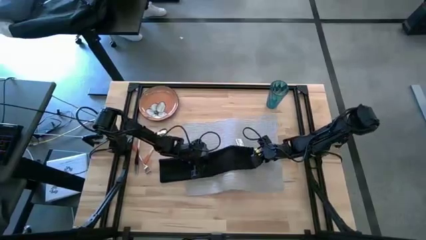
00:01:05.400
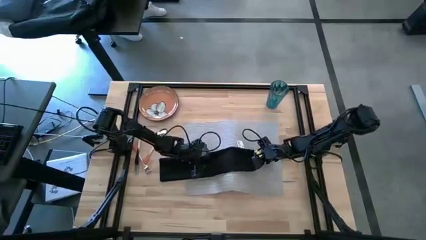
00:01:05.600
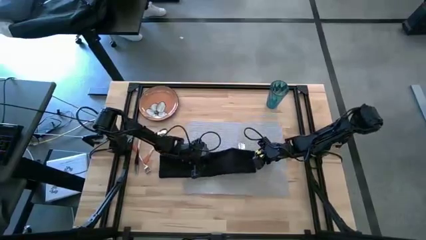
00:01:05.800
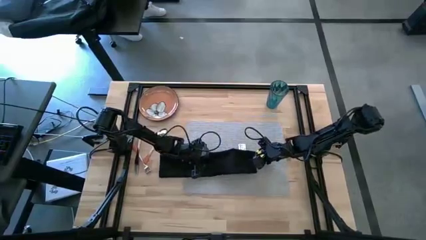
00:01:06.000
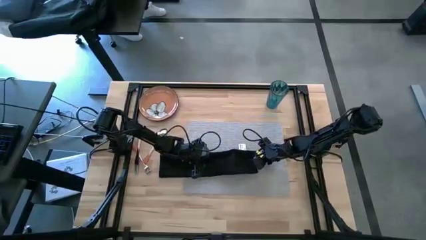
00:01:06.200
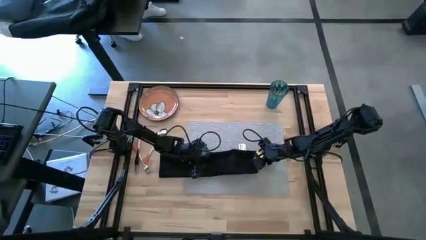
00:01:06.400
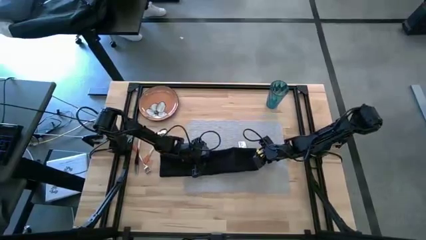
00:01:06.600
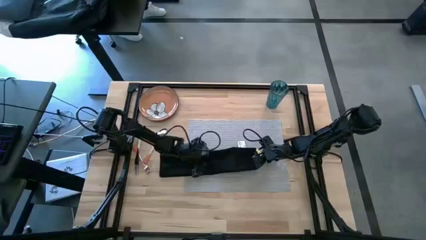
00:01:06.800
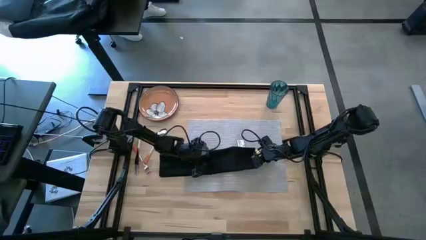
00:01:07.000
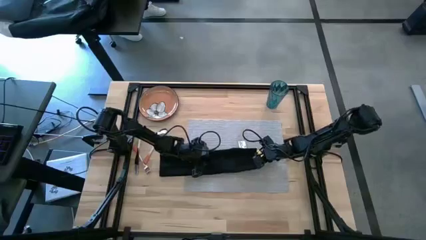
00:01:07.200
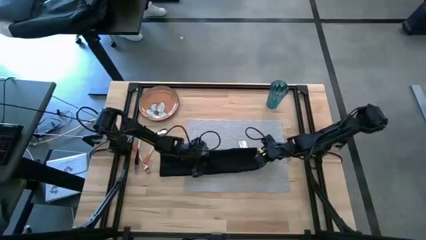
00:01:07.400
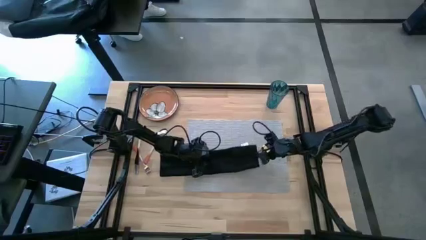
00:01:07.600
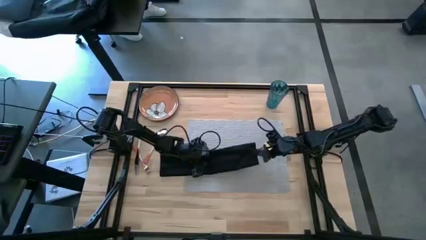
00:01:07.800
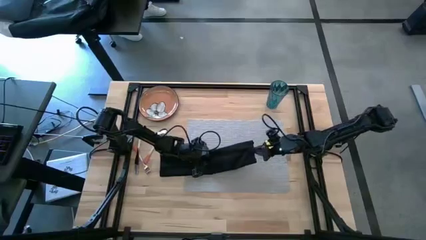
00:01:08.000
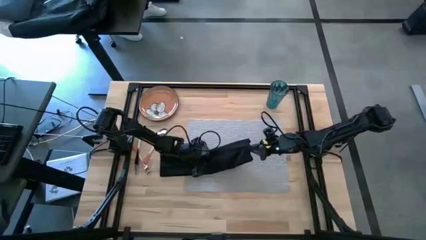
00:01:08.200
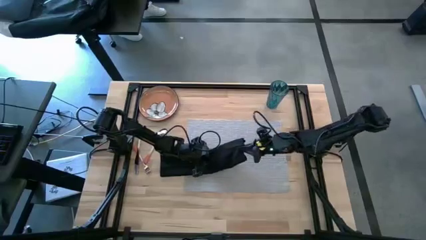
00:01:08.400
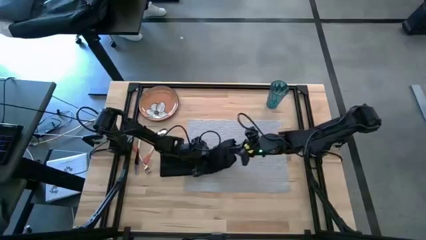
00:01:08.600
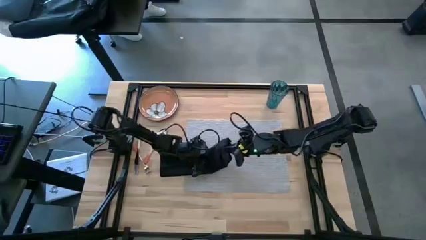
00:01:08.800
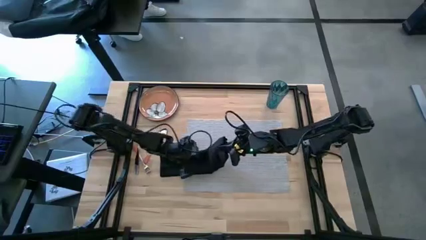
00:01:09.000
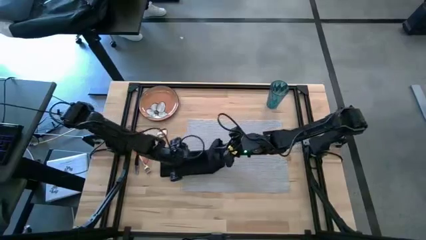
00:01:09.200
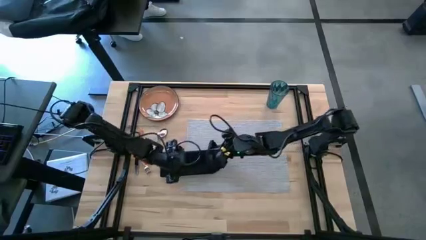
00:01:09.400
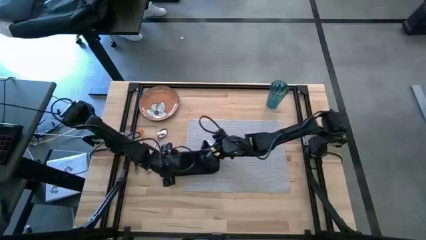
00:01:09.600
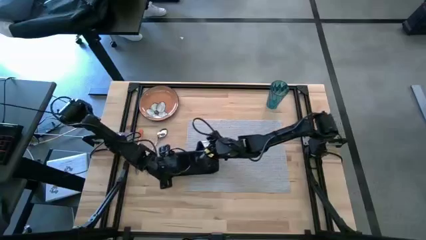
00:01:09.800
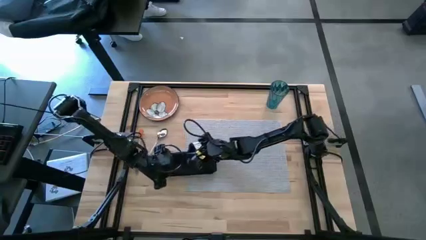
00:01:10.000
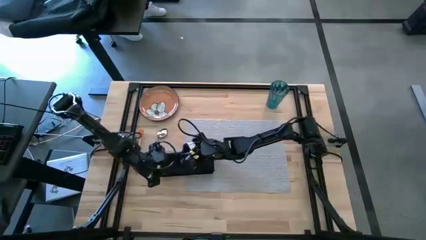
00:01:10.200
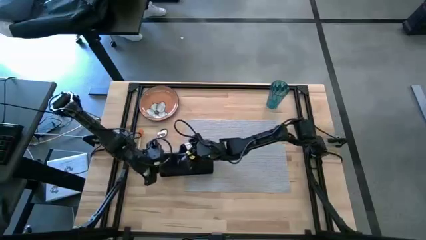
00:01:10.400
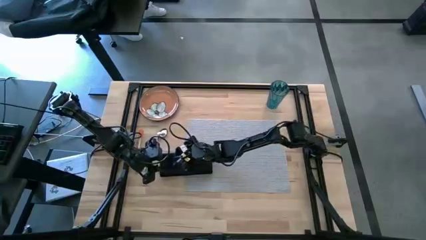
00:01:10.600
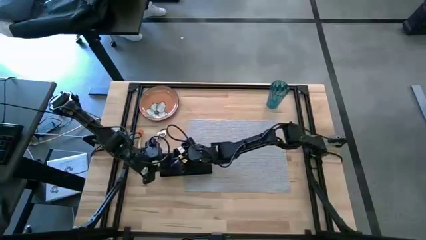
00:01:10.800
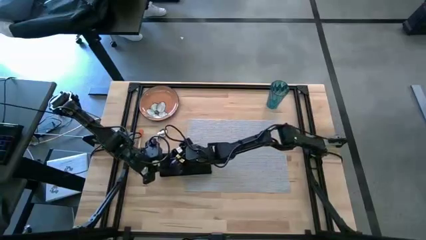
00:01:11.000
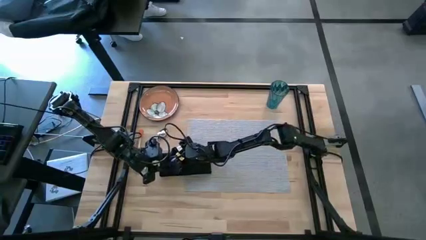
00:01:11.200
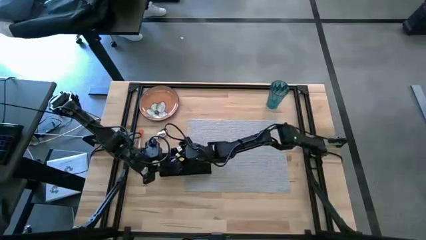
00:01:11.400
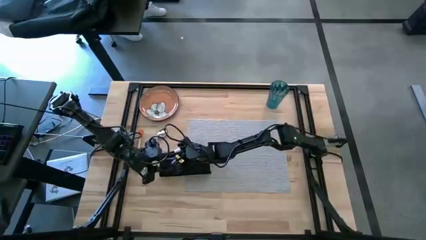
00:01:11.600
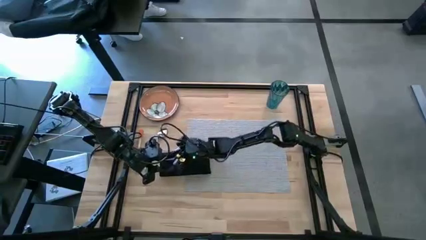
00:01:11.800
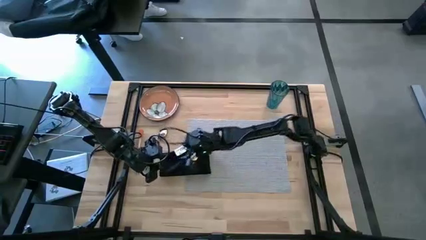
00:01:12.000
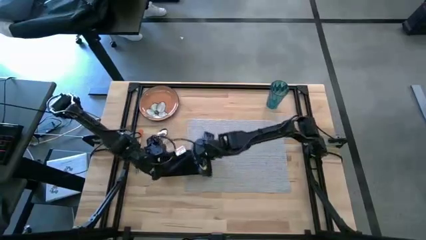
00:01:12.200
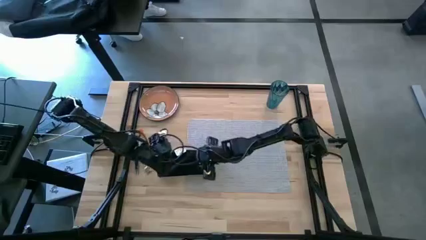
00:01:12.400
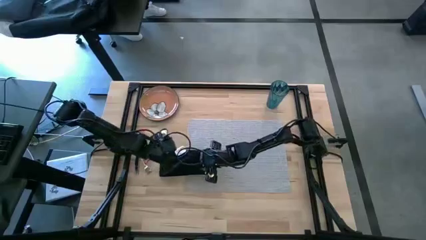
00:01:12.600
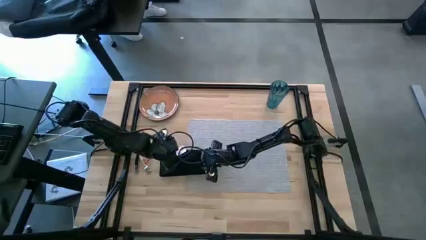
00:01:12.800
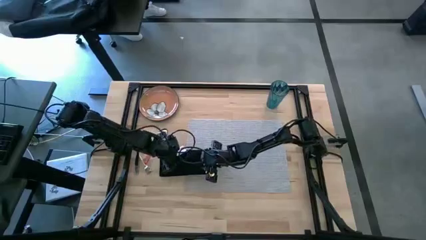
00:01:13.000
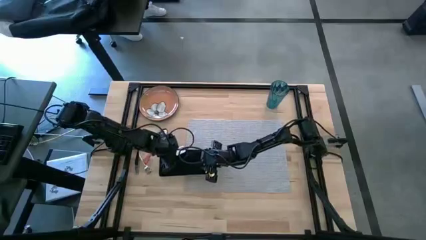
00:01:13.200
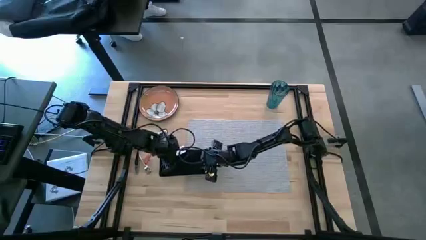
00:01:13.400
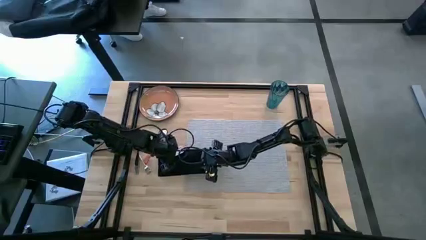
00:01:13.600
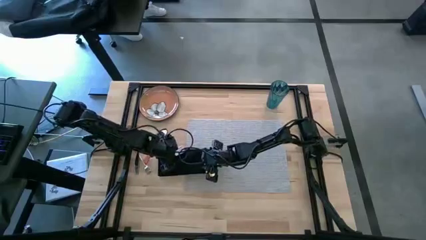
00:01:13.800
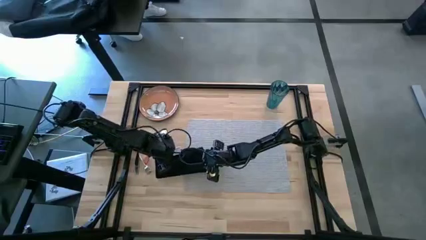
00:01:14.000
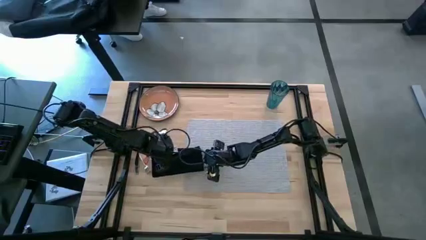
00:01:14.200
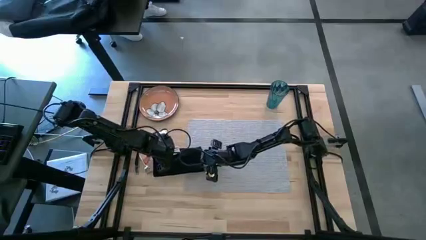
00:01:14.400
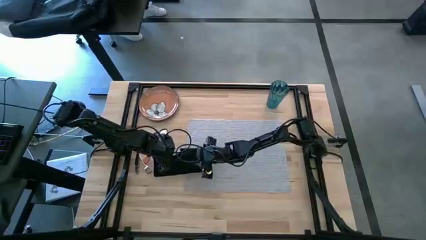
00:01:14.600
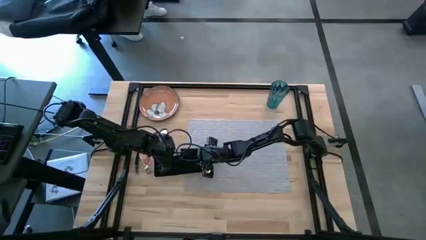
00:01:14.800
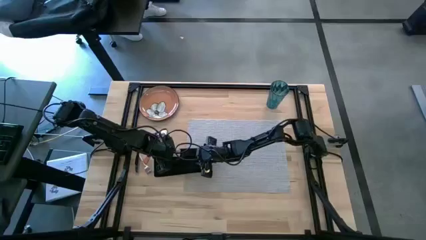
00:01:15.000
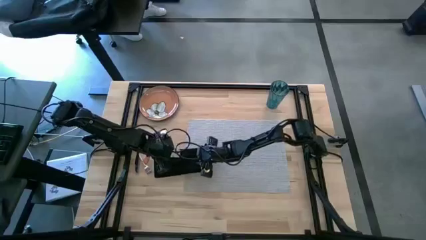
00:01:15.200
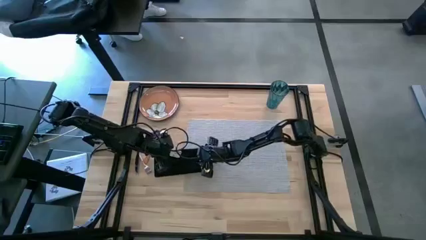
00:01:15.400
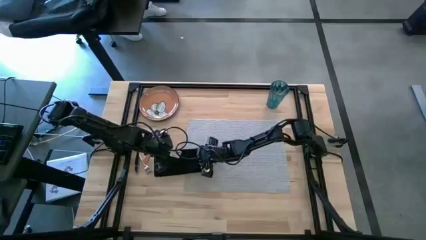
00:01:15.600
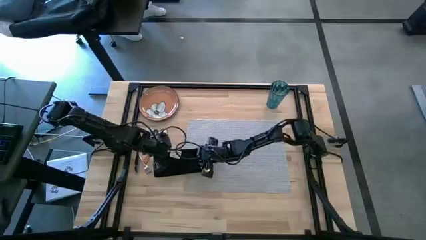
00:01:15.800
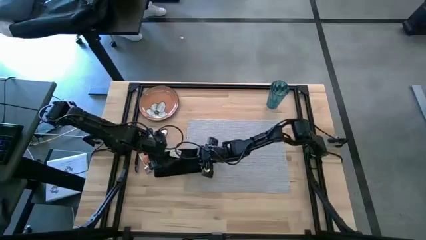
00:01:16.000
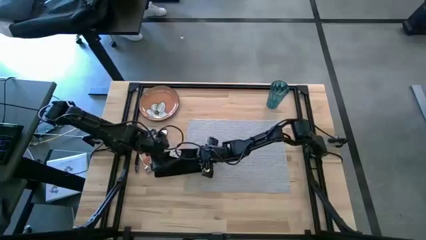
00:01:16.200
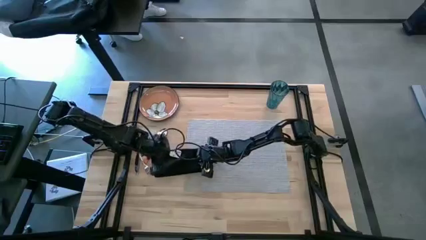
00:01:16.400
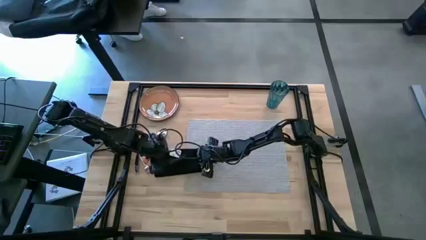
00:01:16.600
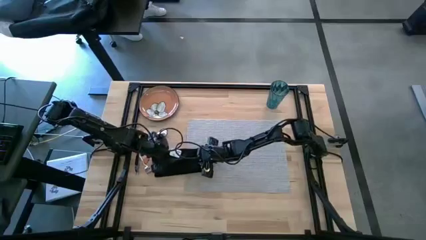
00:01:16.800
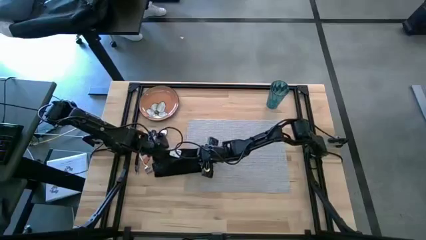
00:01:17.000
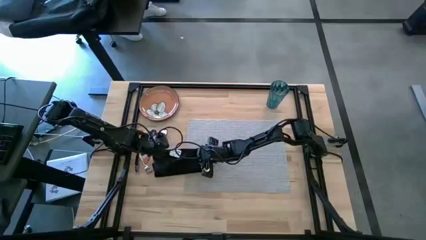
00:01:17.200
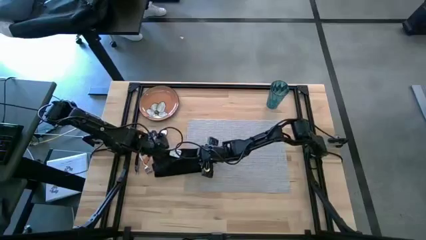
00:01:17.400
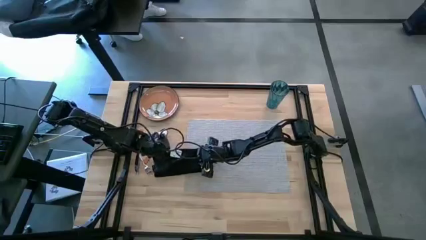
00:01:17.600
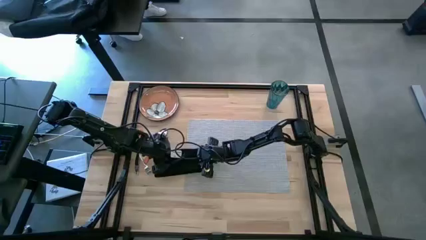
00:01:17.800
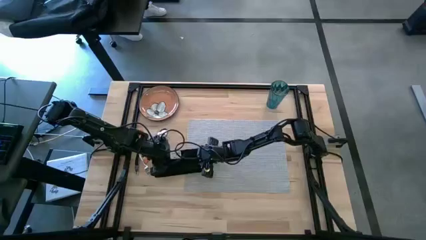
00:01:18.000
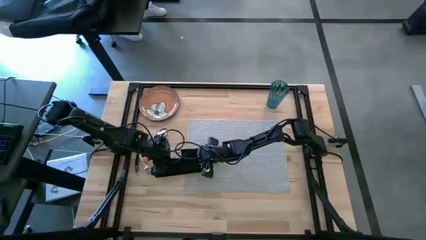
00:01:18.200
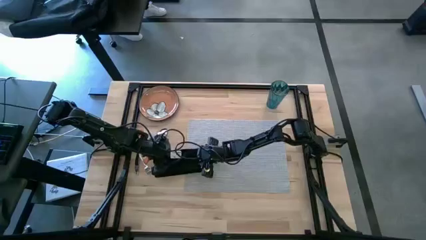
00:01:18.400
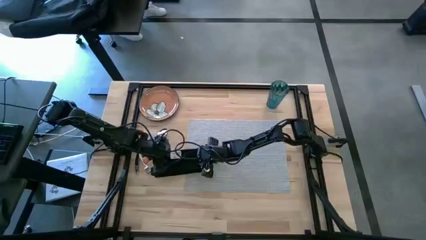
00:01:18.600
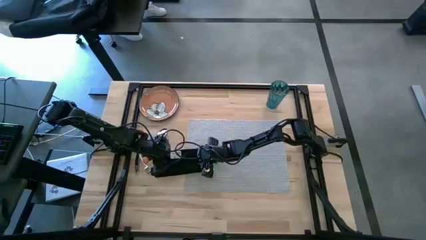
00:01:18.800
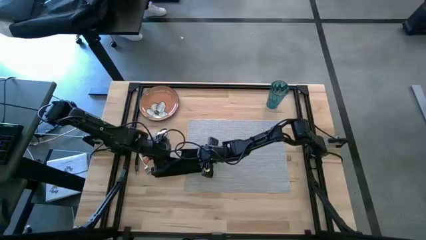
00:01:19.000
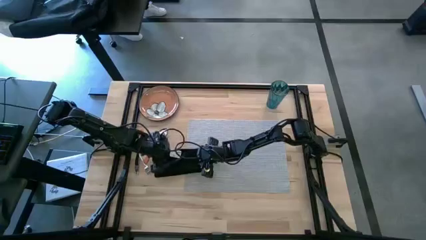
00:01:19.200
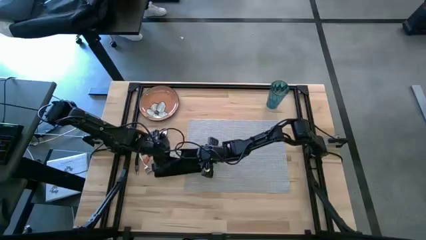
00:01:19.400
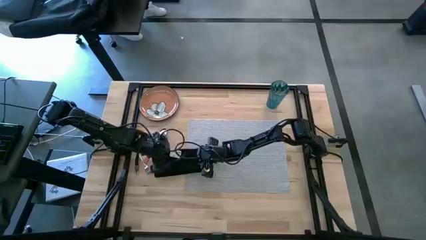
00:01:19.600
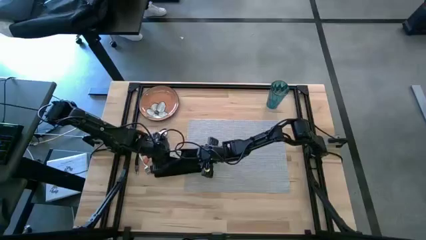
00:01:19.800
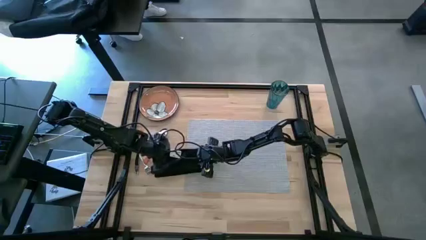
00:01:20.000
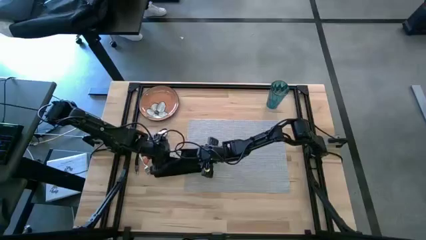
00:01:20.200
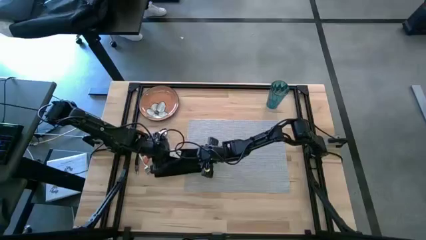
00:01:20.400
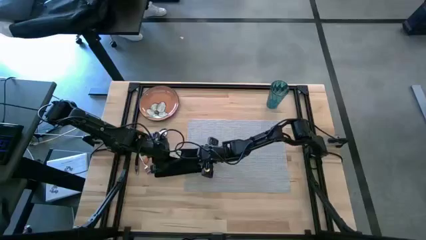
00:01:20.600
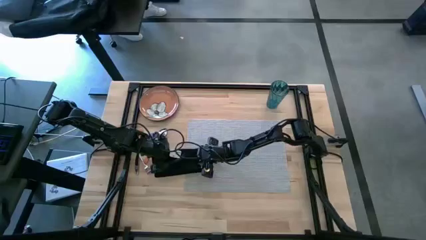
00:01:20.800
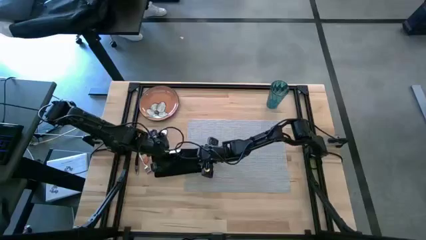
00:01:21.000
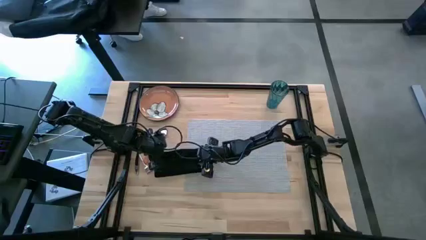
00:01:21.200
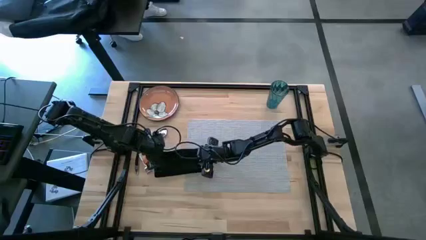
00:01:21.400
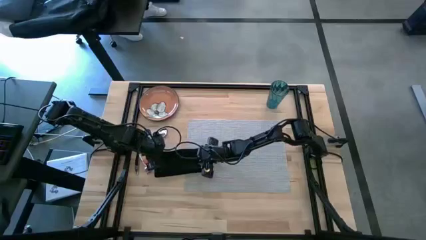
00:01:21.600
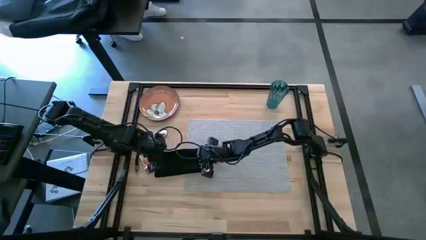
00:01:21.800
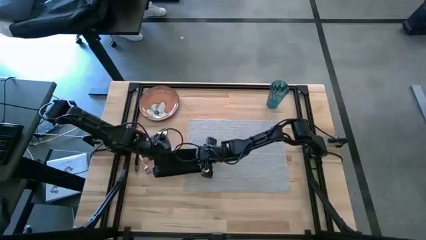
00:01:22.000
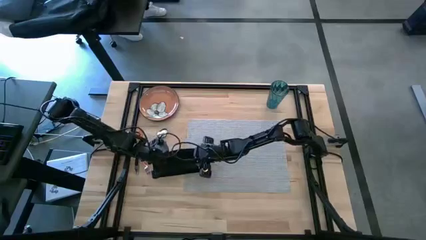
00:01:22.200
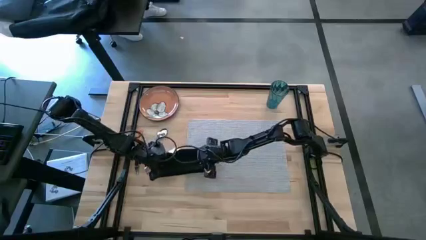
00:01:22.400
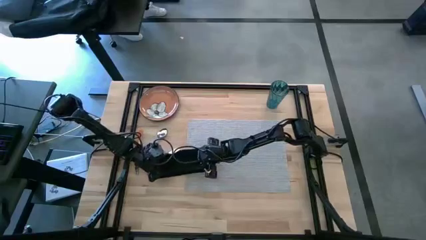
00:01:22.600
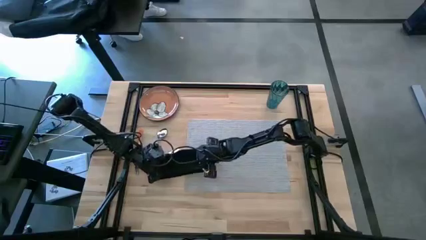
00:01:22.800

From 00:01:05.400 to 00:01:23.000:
Task: Set table place
Fold the black table napkin
